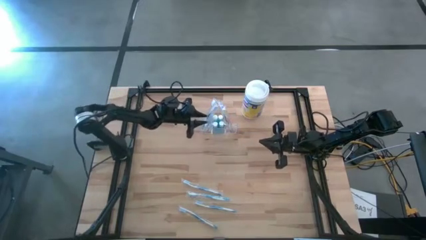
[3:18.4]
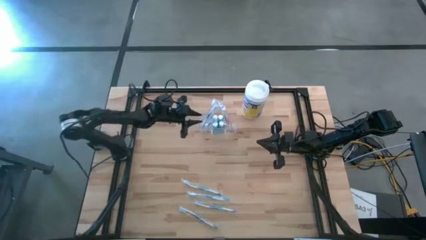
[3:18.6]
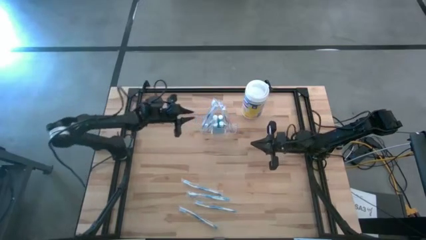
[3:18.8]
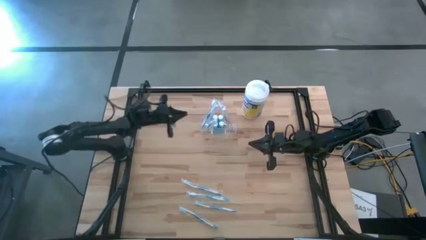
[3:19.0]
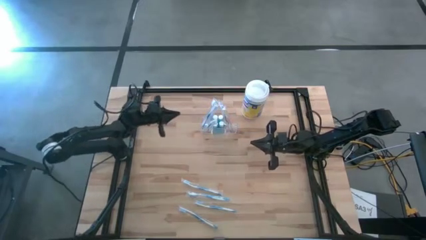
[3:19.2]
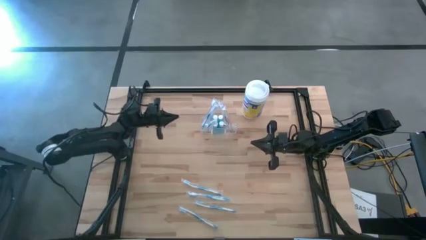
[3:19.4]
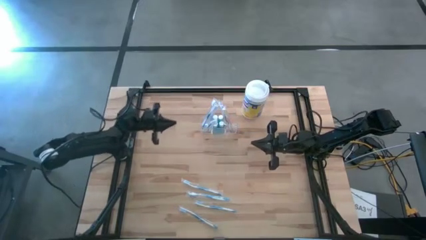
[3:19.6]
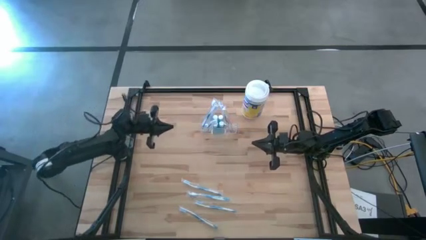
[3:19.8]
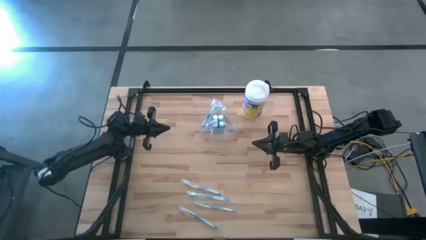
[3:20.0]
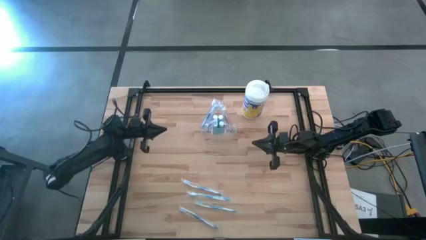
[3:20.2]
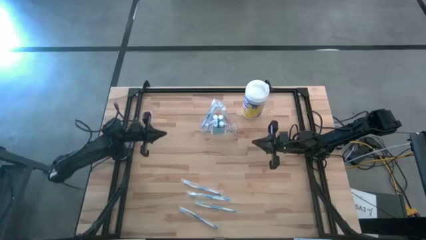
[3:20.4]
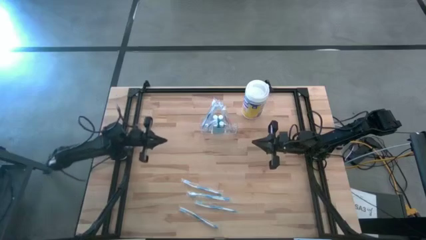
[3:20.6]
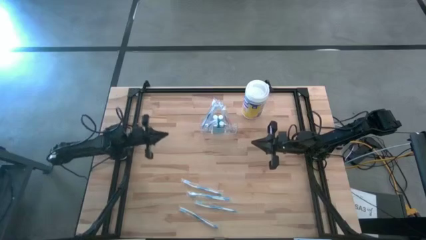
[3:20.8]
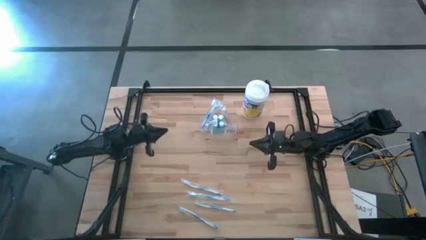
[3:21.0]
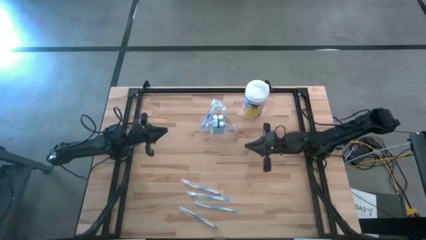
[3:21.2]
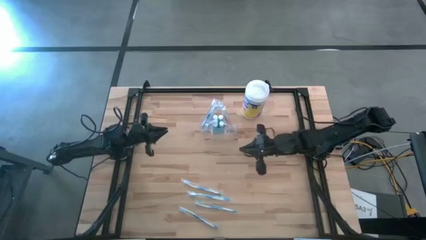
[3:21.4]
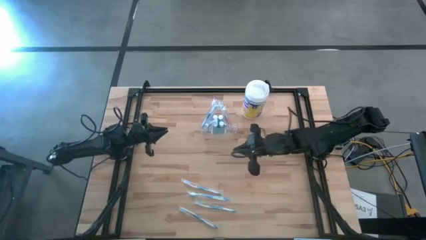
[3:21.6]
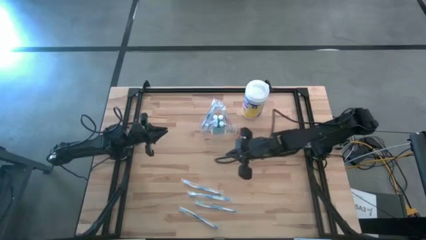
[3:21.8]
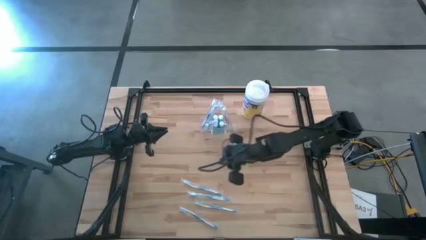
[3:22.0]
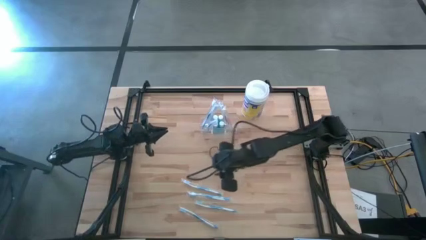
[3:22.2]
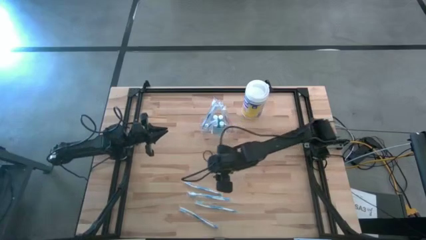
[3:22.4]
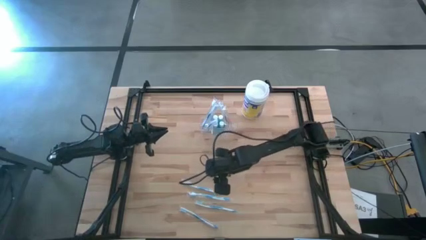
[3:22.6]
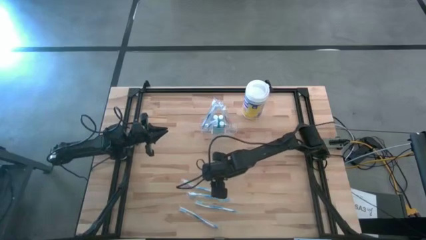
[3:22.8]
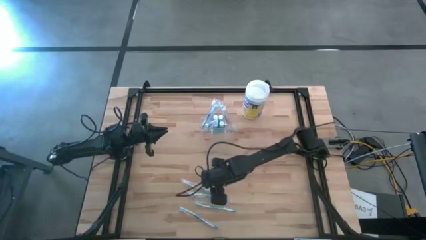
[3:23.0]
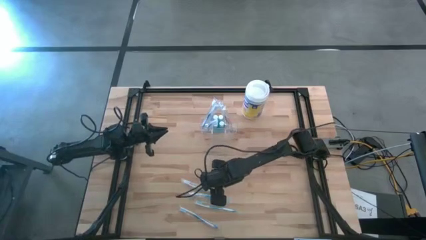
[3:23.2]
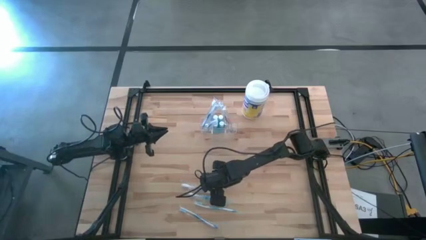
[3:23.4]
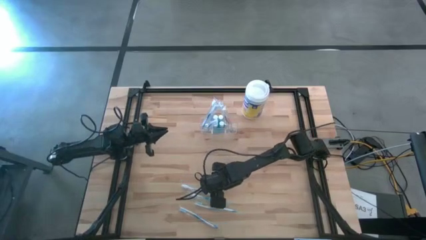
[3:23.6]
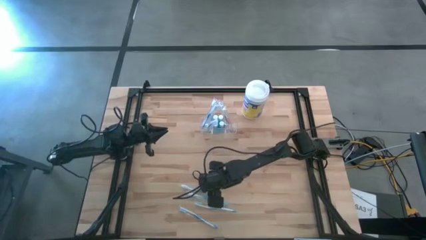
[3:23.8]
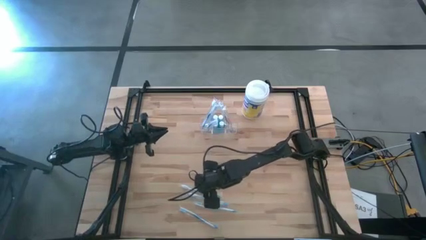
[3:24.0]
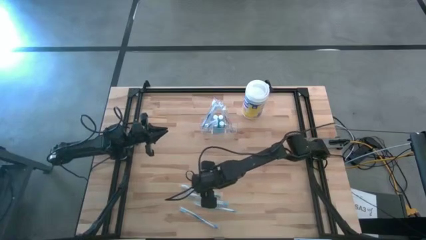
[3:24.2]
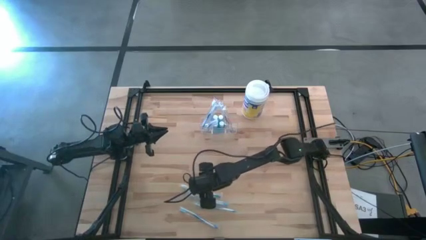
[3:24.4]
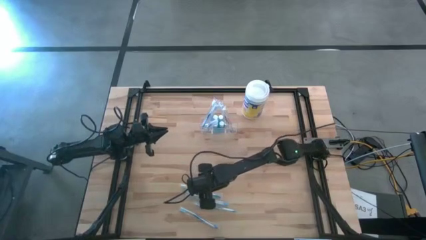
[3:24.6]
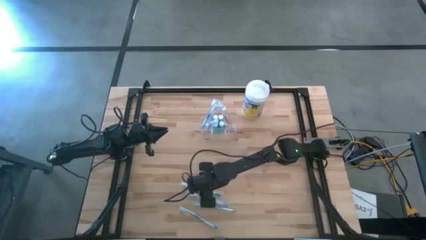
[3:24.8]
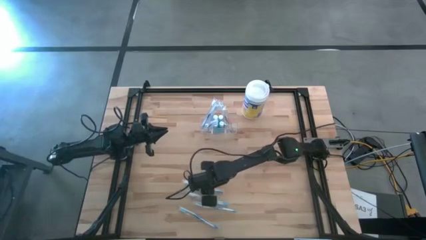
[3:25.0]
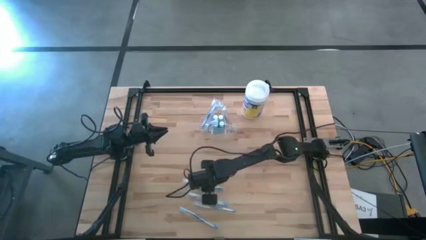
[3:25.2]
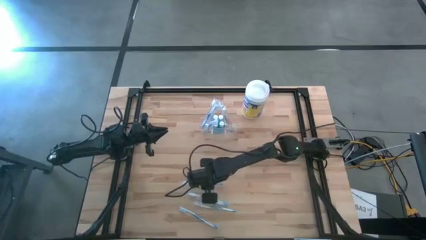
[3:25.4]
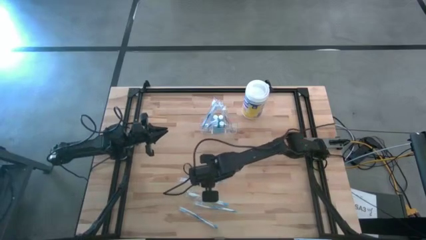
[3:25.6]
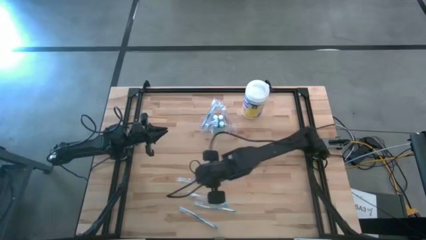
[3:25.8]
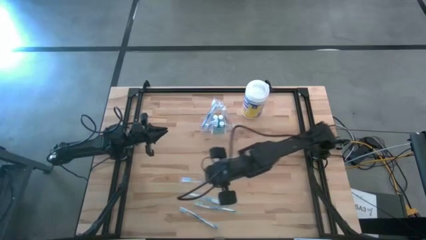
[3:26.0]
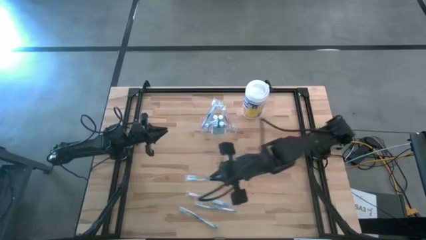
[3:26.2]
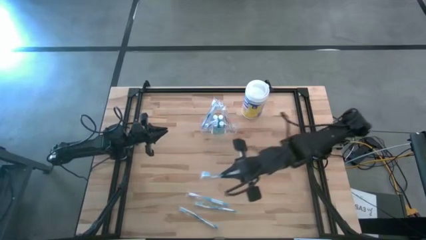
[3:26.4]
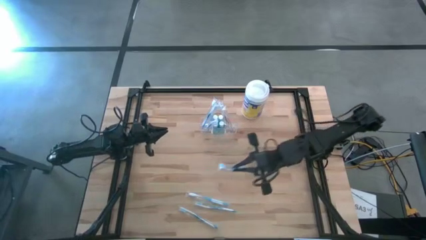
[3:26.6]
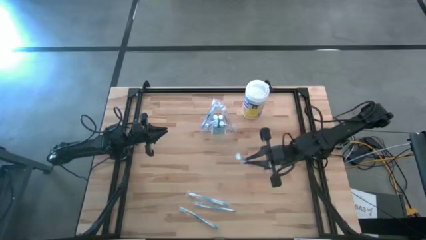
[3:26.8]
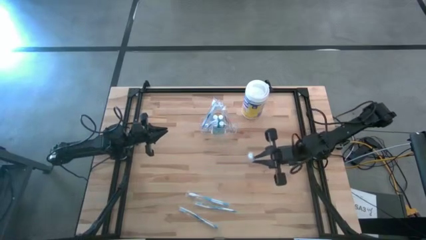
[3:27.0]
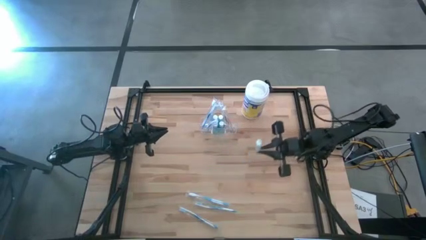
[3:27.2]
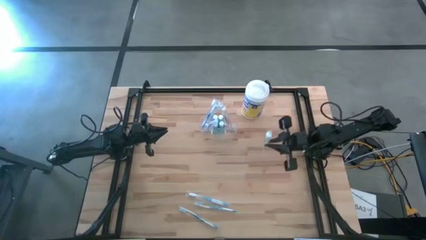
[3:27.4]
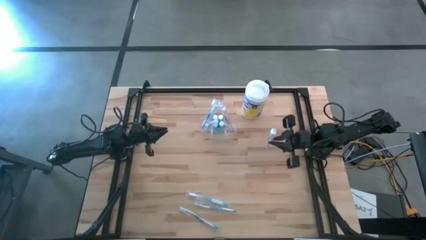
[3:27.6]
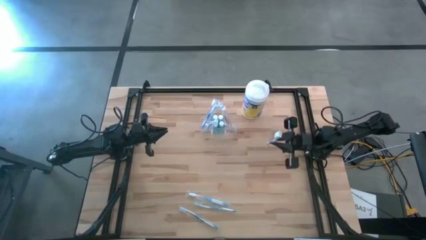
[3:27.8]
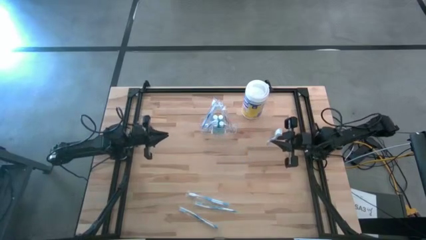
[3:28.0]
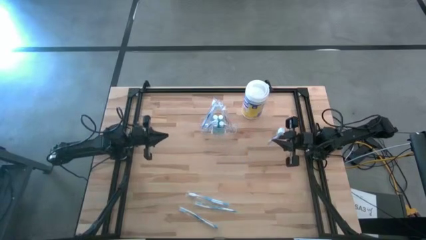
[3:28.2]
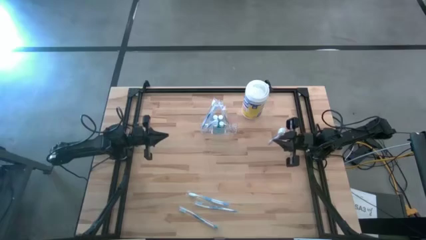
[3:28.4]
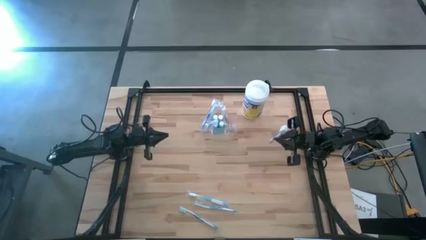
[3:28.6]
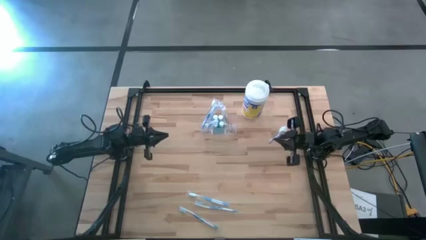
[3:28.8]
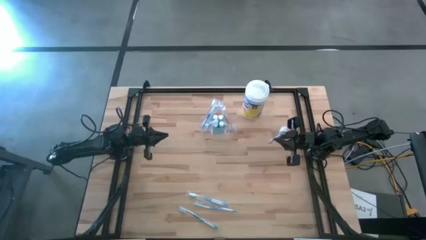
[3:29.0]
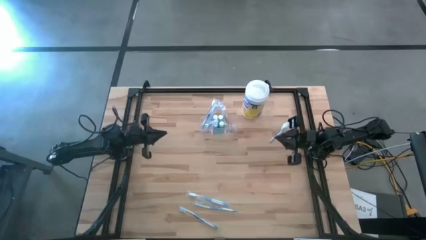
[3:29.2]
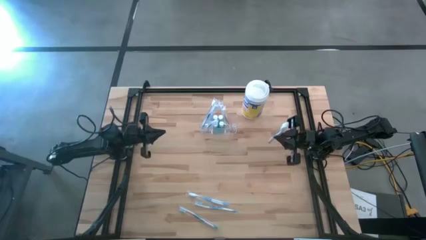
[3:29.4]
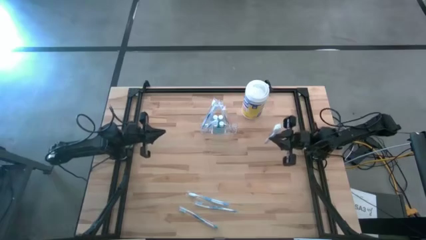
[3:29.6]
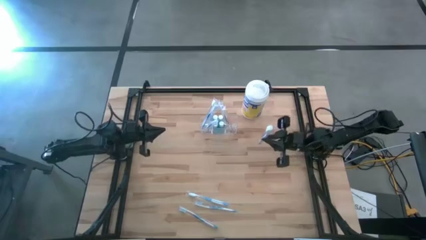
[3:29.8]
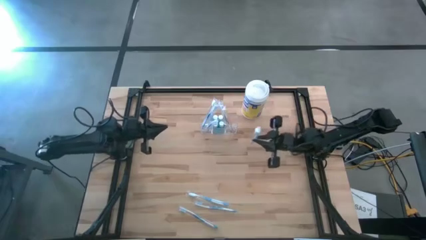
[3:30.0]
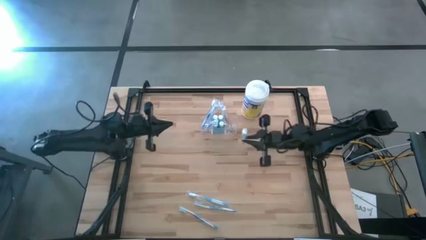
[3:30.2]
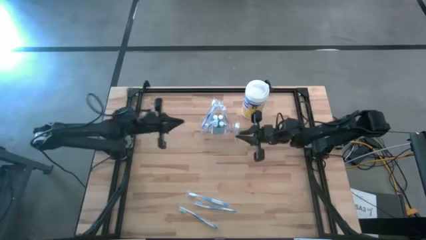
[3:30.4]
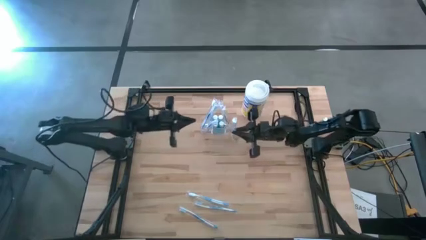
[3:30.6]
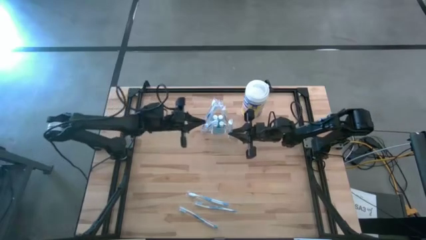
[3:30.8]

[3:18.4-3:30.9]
Task: Pick & Place toothbrushing station
Put the blue toothbrush into the transparent organizer
